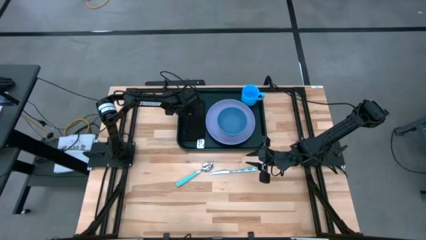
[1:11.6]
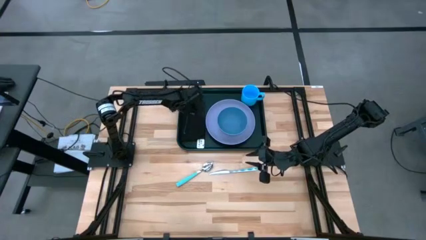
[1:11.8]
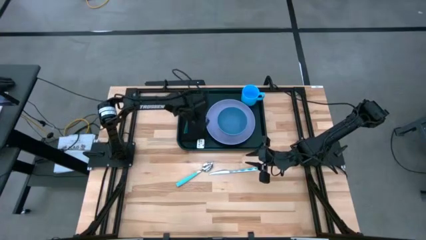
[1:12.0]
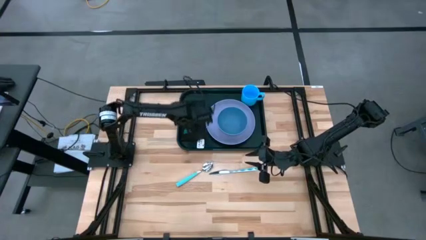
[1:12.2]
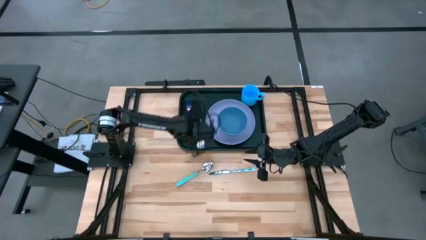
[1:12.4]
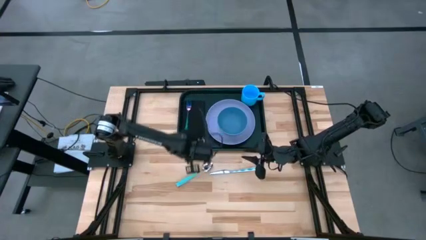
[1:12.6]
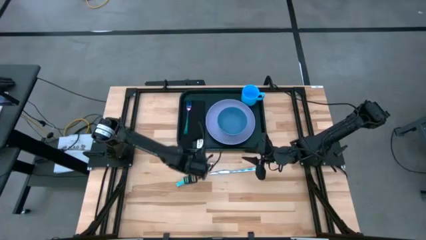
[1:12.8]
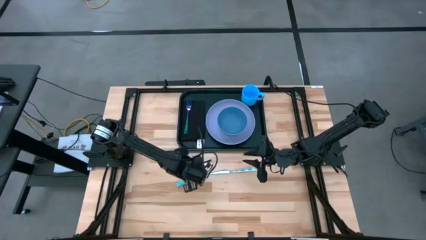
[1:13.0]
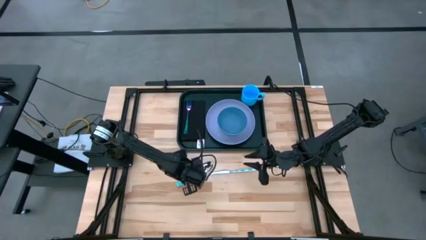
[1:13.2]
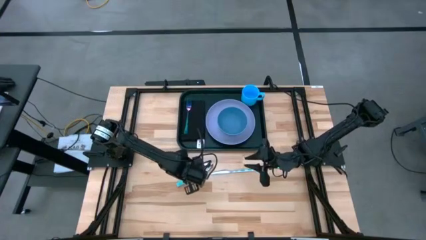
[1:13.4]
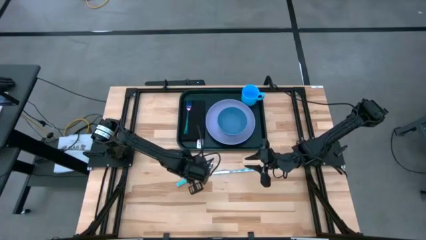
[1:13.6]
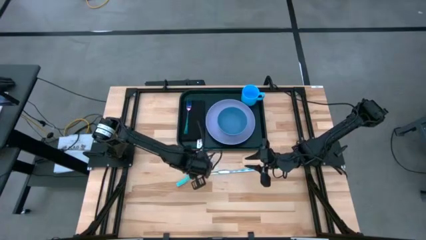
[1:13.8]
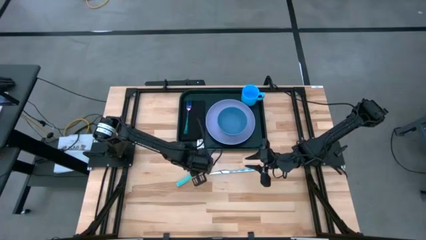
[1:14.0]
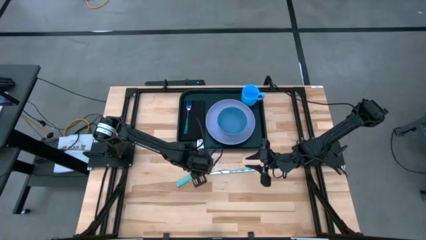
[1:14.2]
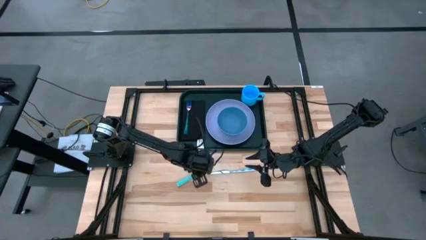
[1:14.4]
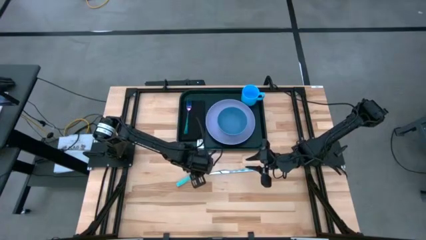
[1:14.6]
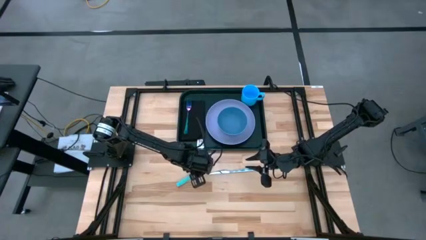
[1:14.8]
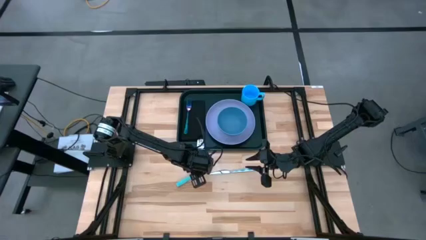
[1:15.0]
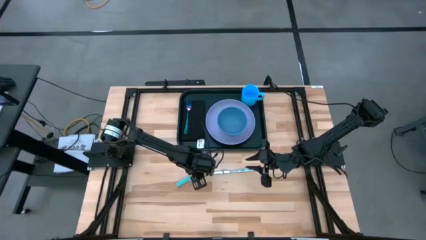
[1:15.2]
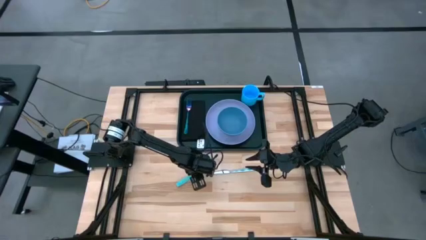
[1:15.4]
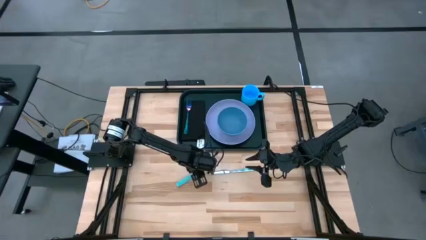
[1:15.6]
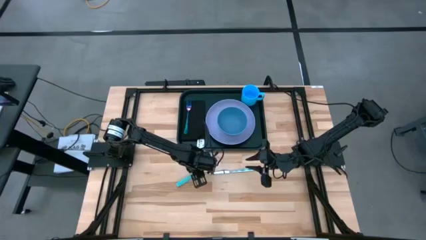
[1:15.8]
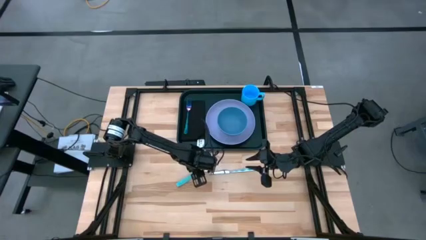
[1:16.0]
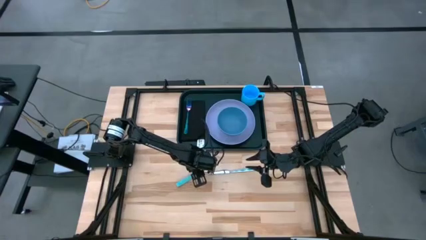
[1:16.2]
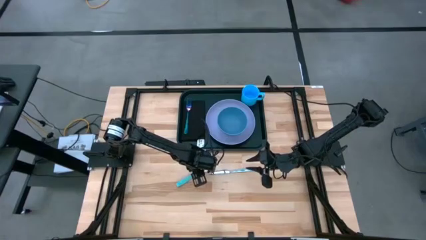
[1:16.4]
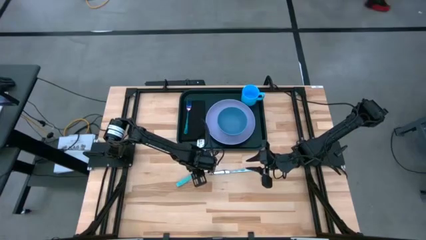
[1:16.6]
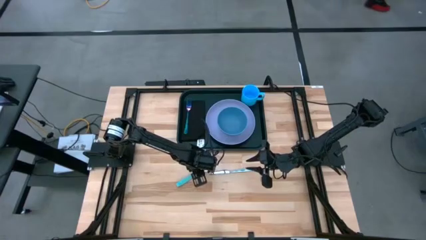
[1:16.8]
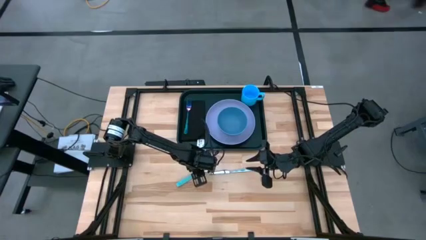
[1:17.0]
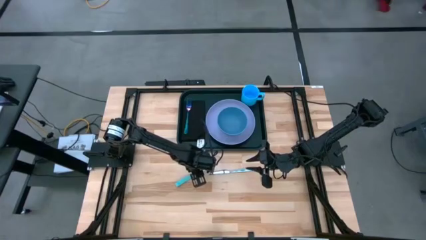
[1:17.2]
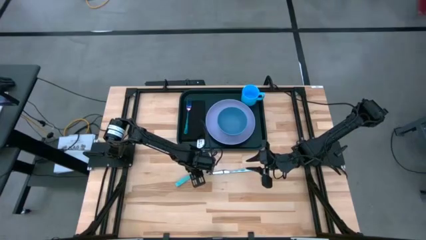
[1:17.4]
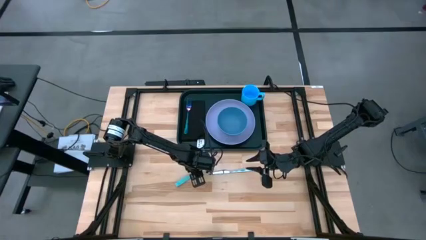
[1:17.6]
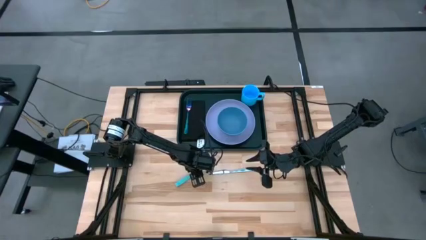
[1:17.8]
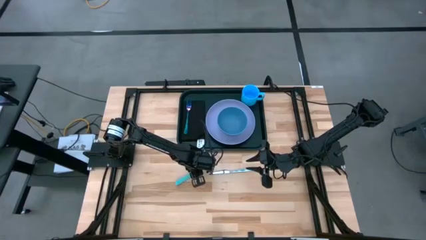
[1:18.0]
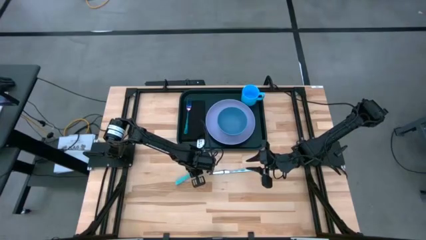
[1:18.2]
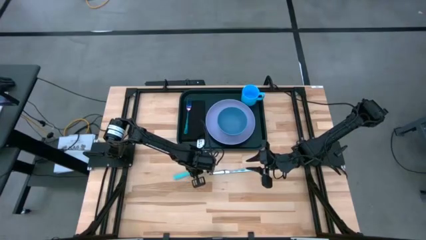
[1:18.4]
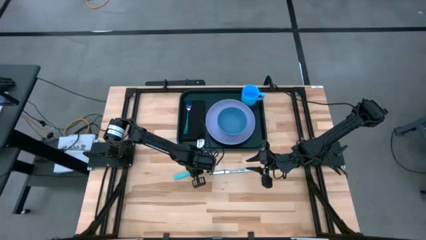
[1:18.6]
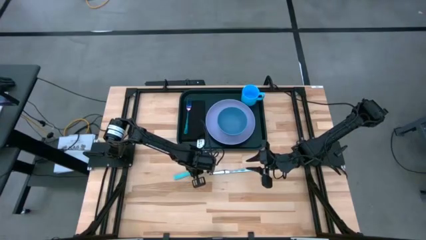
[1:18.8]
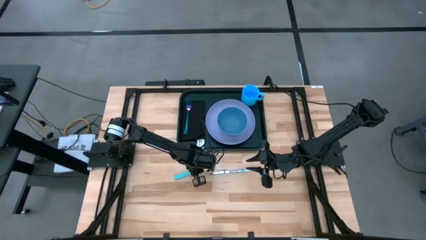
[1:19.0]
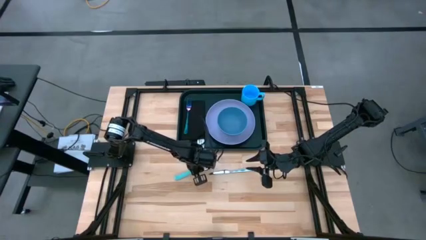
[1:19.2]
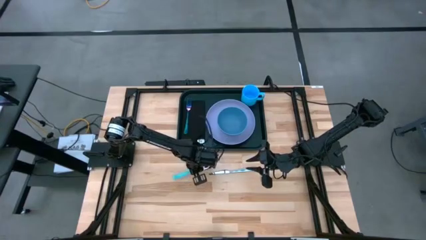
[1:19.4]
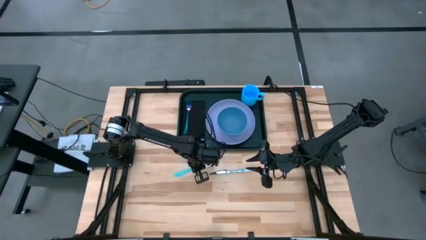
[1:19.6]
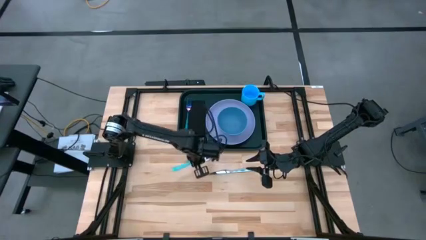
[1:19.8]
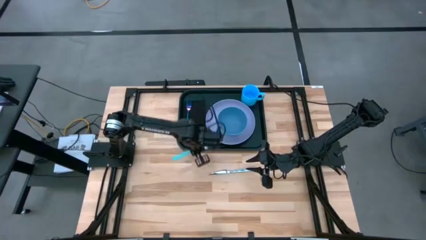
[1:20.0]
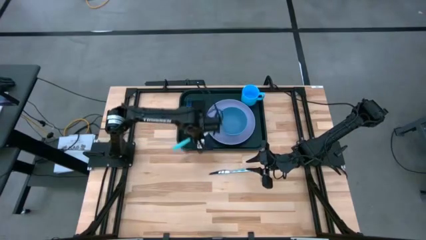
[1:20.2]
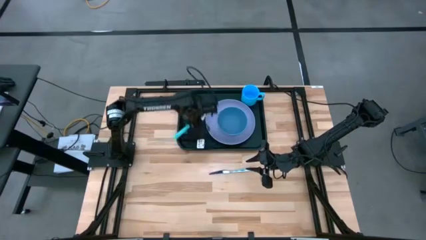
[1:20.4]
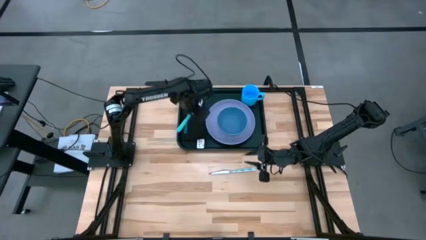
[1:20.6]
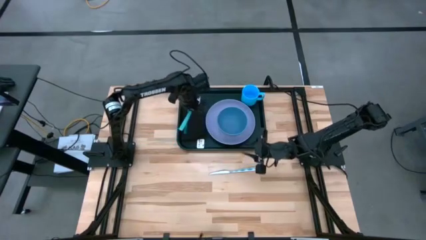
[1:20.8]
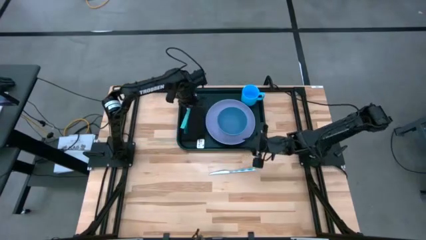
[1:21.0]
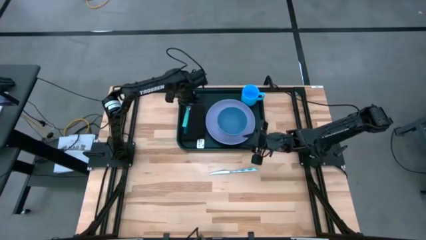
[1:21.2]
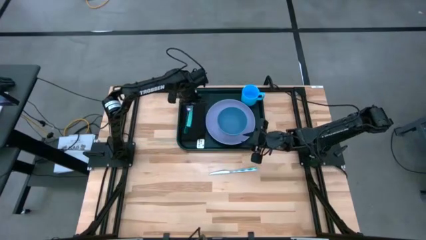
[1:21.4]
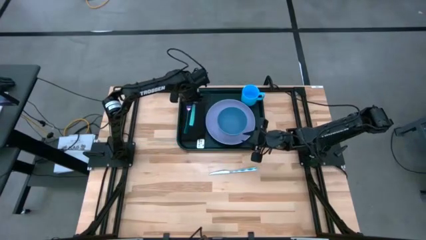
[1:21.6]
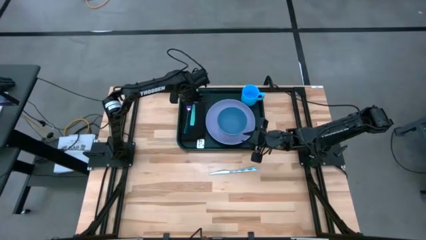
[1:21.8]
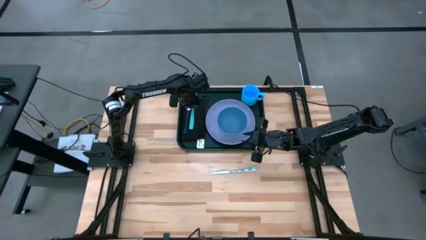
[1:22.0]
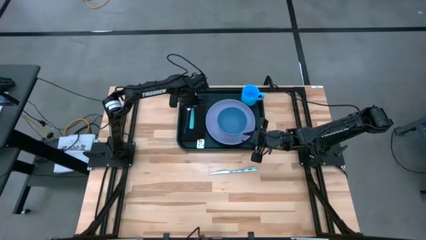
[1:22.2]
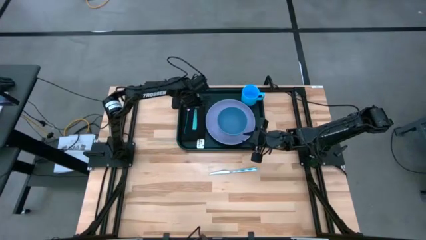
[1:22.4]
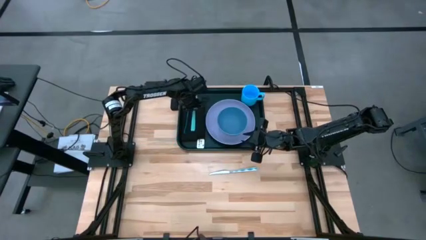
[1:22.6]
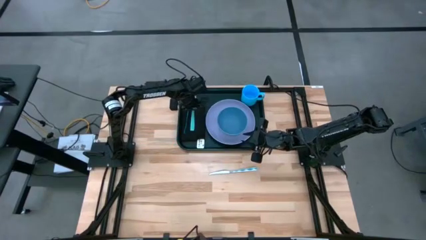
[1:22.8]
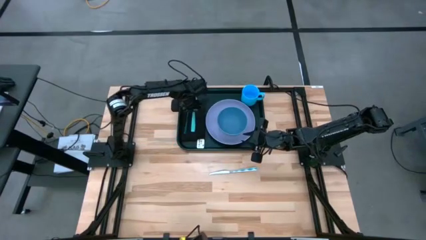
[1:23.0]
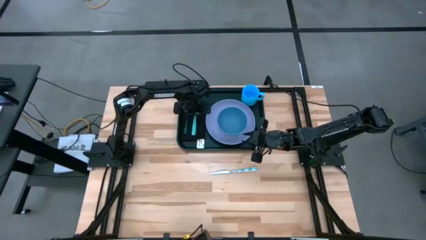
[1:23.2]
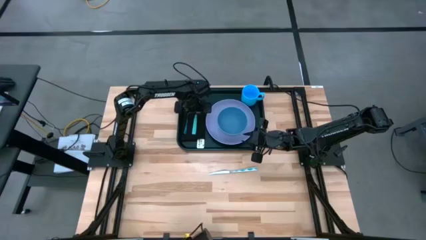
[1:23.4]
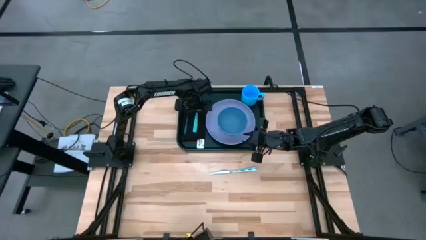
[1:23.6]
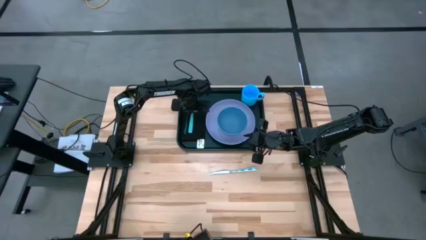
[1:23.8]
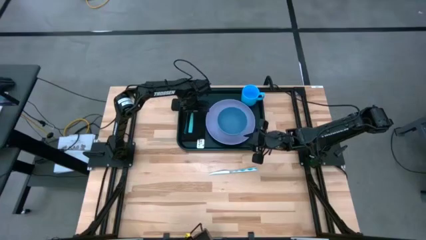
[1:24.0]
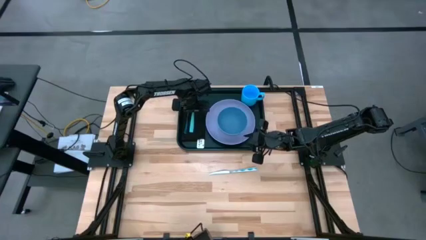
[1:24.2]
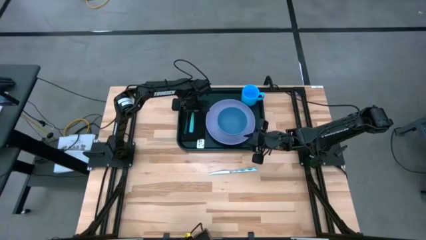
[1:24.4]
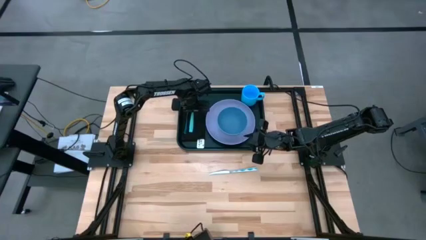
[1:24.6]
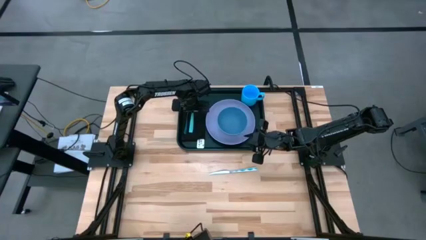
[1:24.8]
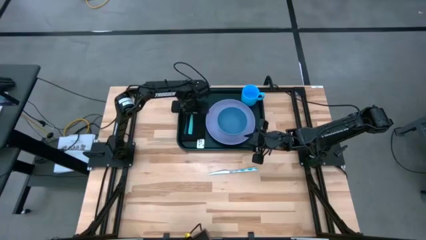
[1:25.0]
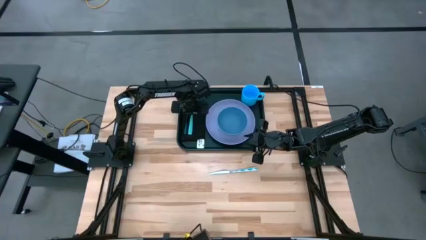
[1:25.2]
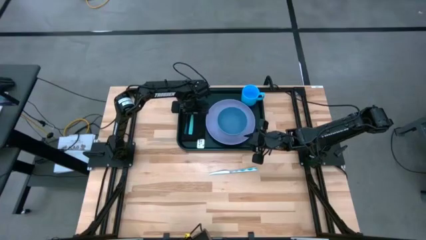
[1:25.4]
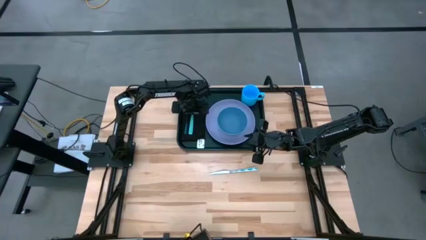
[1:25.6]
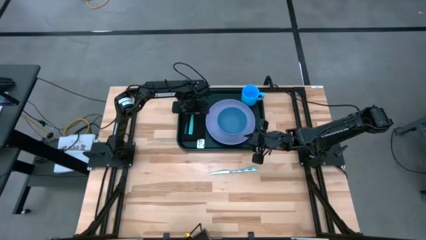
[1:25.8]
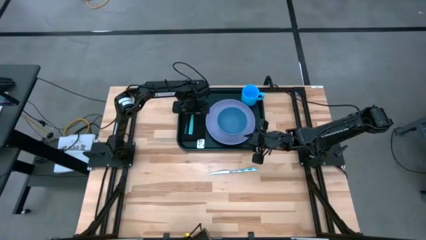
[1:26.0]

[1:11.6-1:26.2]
Task: Set up tray
Put the light blue spoon on top of the napkin to the left of the blue fork on the black serving tray

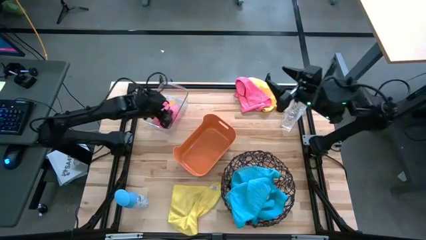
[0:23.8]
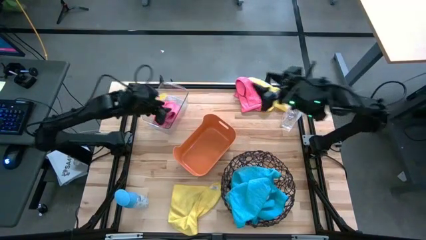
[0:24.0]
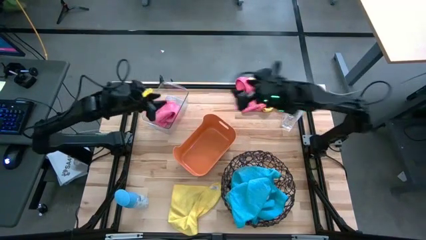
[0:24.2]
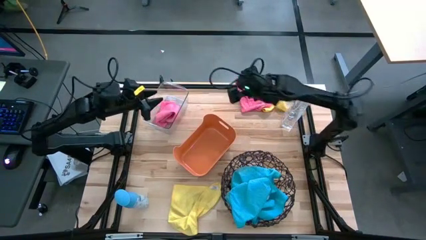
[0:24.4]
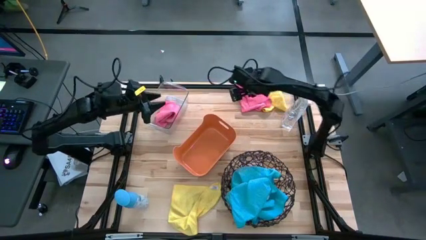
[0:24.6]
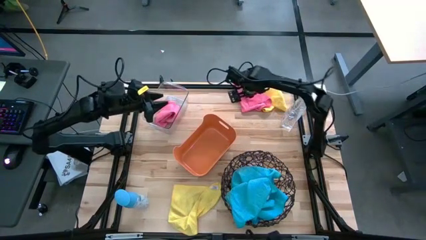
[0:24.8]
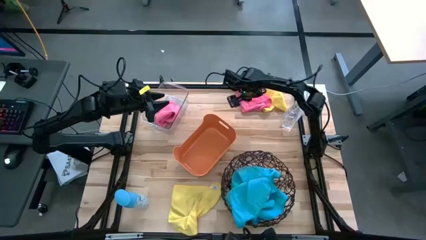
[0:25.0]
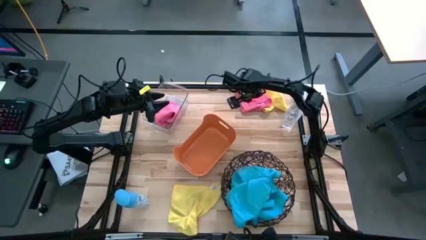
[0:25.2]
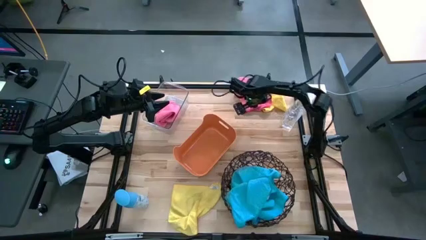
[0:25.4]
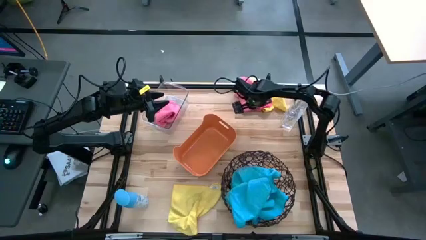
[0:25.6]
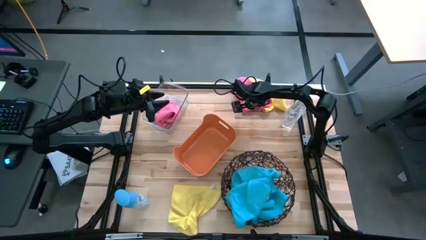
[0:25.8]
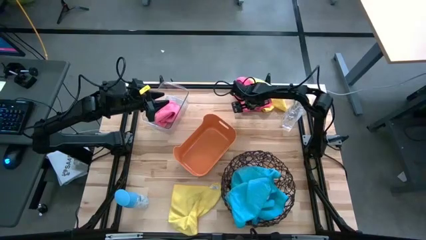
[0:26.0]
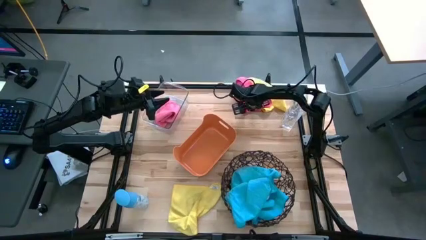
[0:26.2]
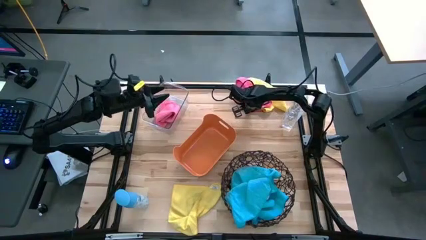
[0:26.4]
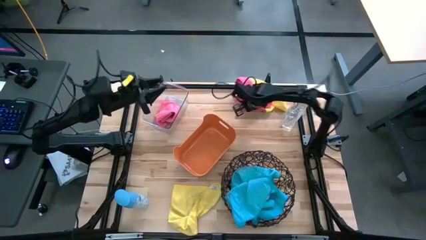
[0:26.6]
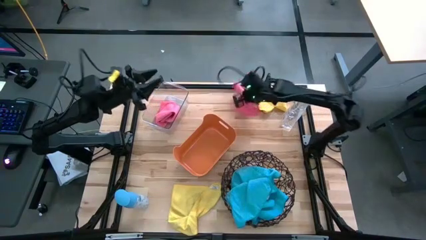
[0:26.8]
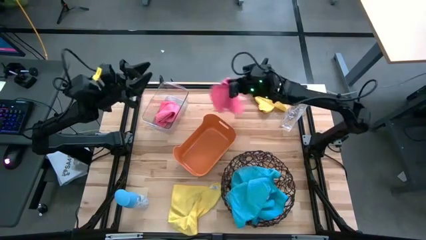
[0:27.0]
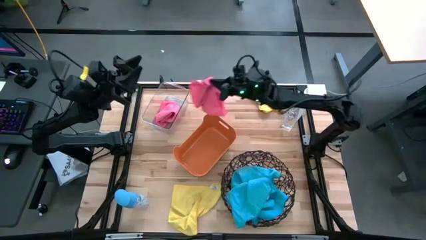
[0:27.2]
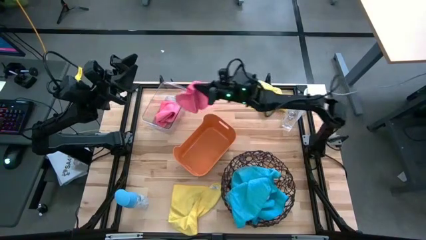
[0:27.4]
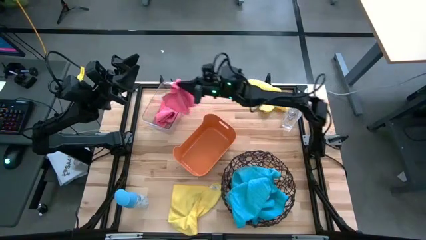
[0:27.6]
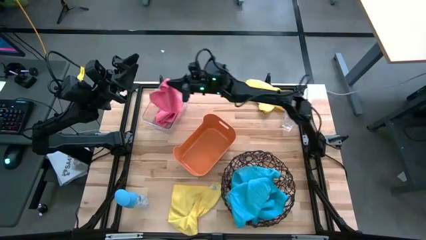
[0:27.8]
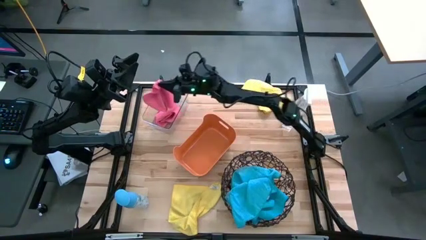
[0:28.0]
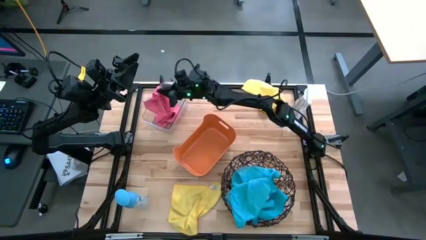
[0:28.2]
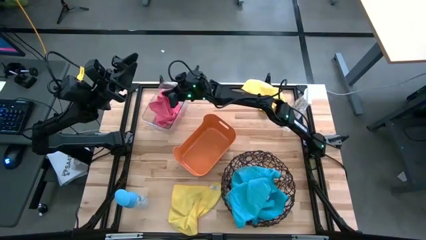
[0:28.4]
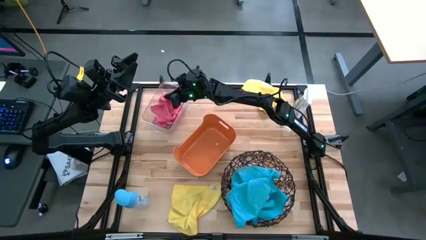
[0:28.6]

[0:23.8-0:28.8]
Task: Sort microfiber towel by color & place in baskets
Put the pink towel into the transparent bin
